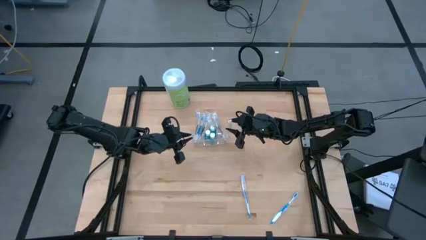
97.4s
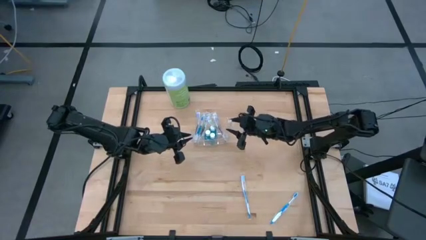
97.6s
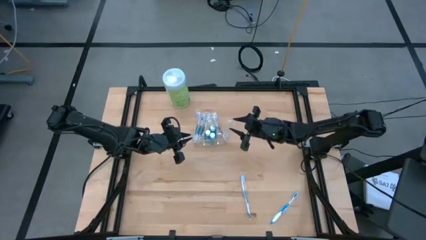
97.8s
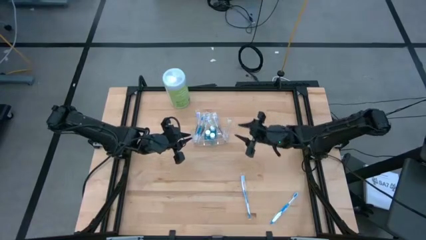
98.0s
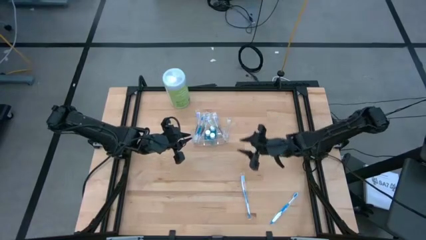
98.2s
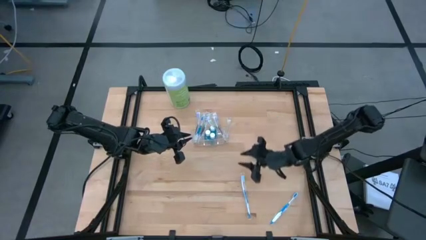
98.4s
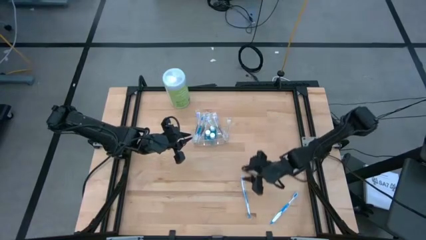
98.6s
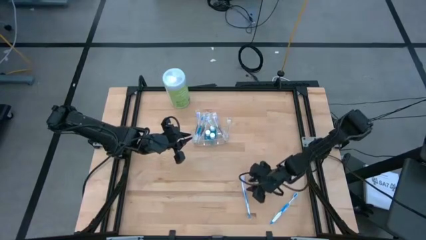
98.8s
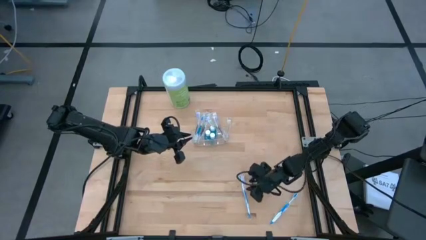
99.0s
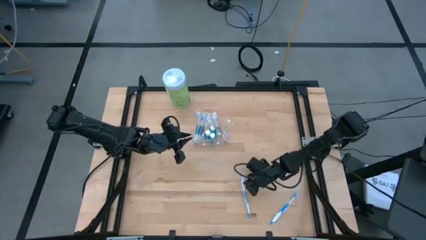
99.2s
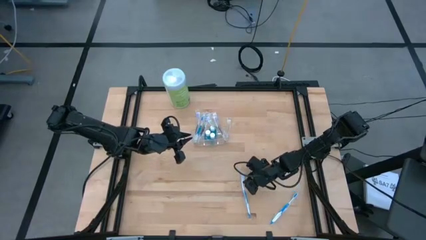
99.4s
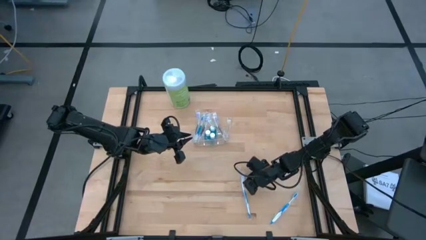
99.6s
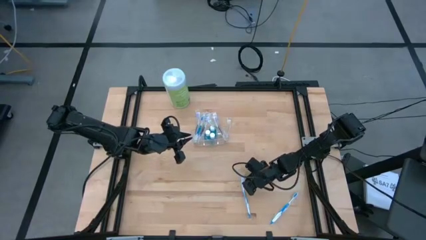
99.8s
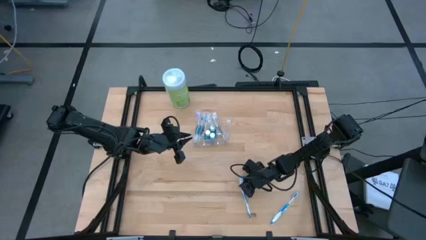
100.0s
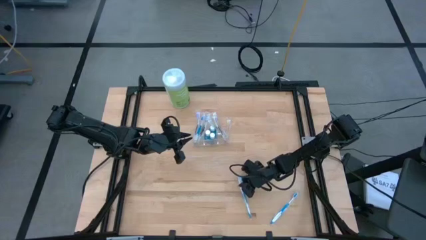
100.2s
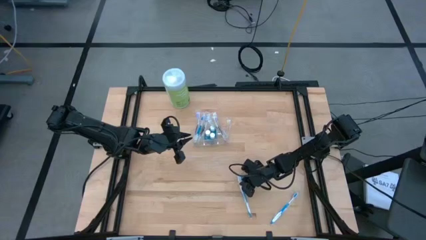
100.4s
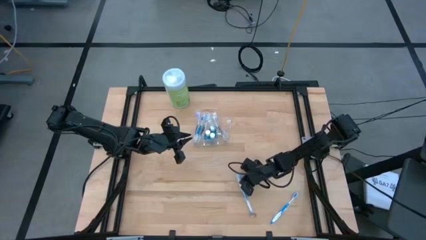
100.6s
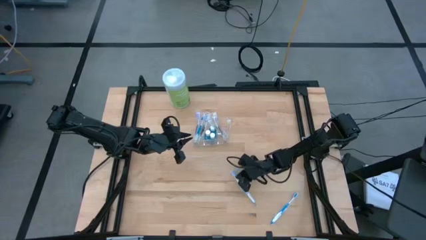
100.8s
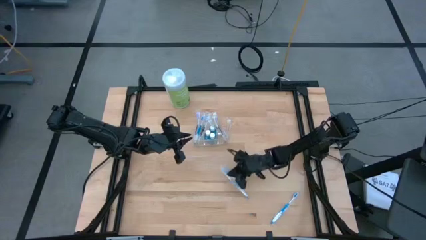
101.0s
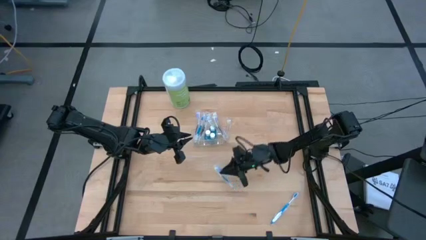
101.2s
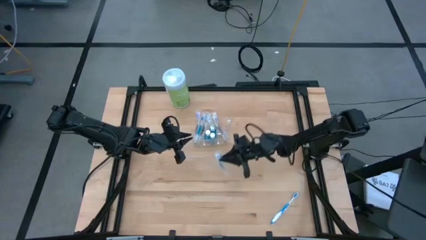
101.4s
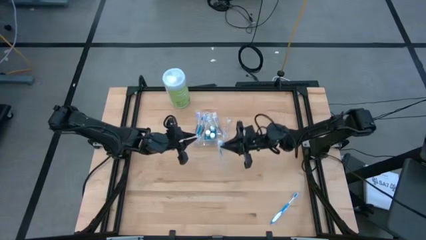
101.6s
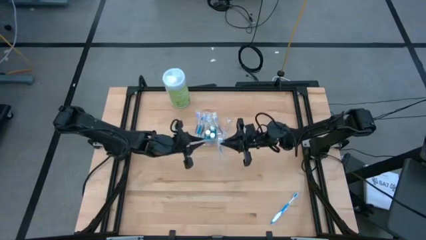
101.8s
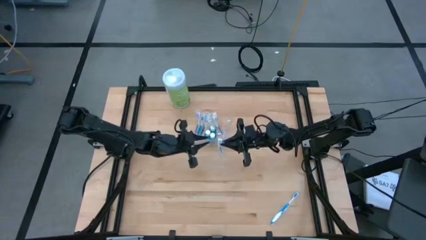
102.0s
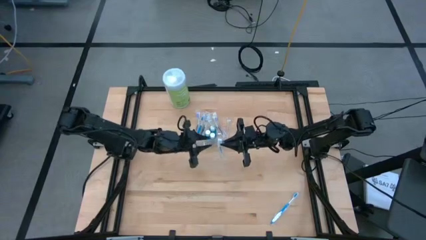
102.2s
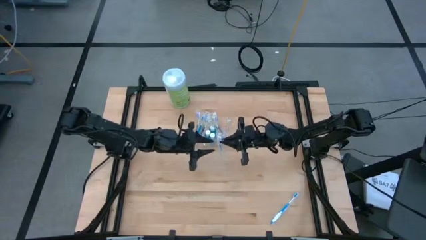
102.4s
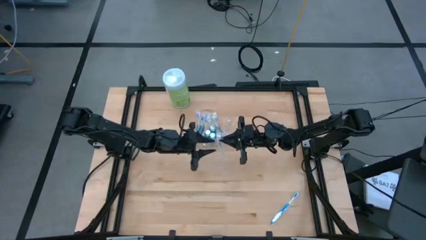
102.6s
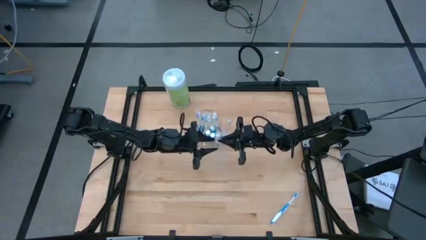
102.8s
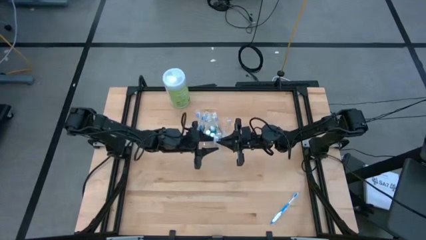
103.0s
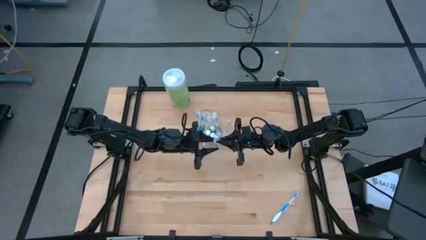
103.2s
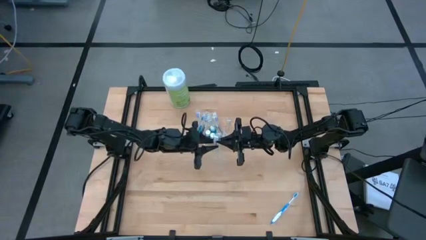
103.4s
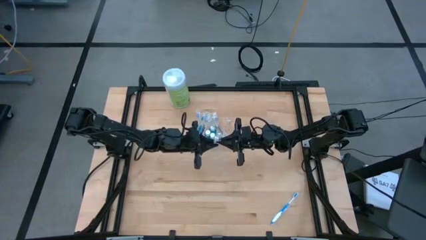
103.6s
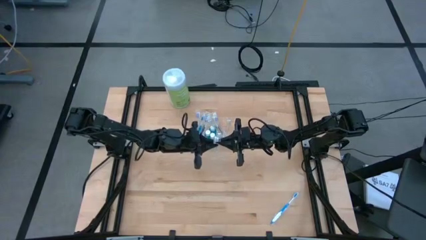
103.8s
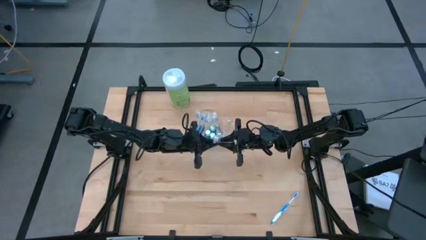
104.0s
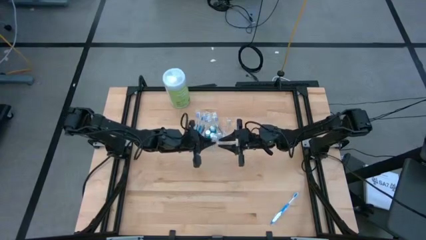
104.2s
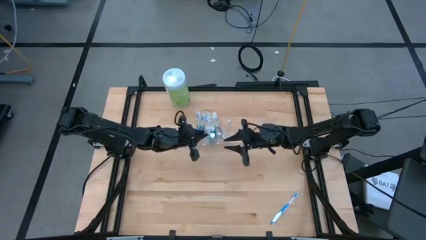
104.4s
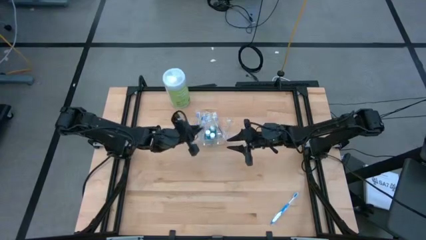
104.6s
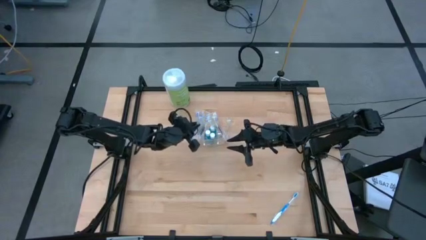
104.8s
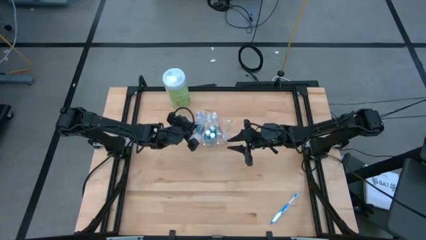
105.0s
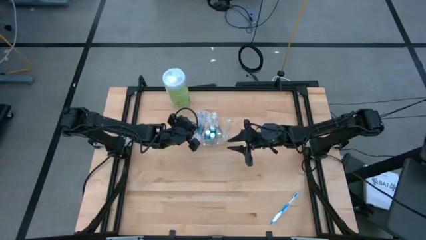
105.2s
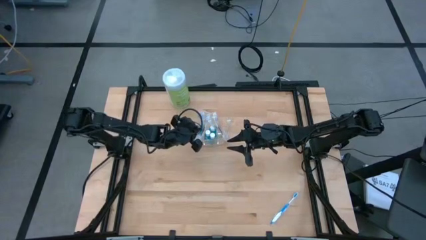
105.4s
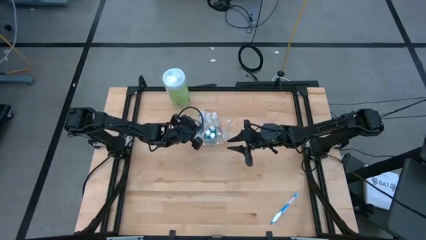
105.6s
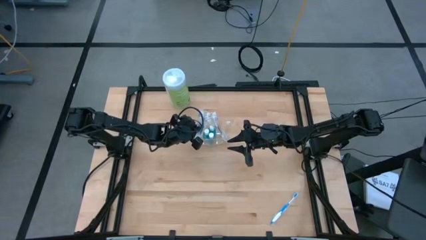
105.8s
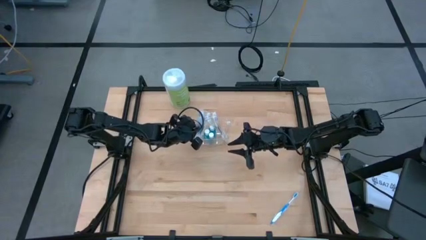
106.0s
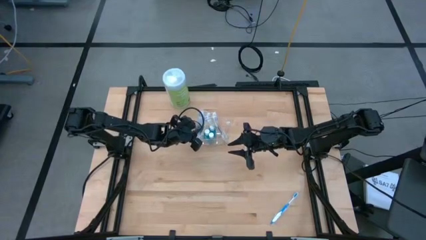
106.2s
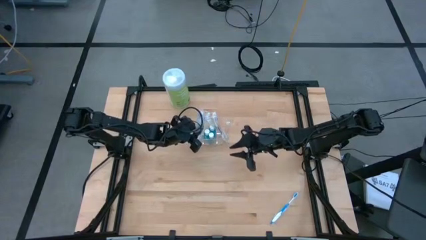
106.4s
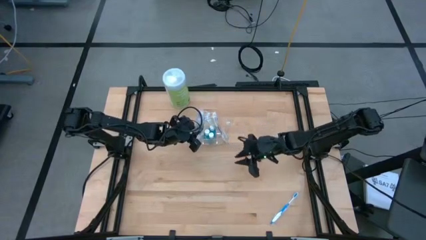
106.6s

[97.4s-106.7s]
Task: Pick & Place toothbrushing station
Put the left blue toothbrush into the transparent organizer

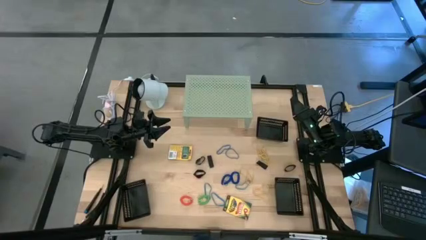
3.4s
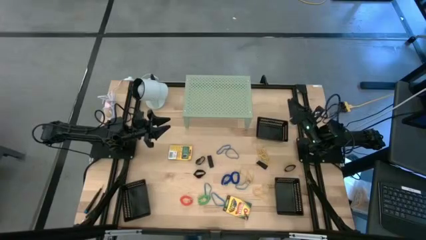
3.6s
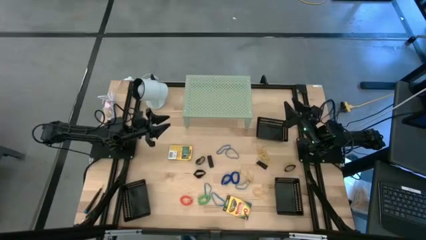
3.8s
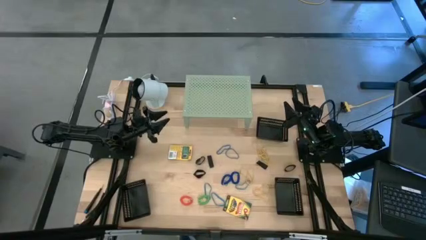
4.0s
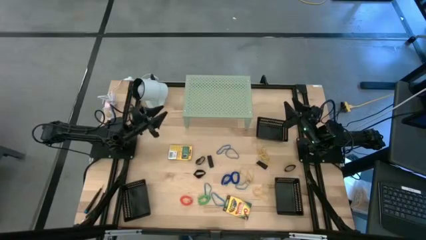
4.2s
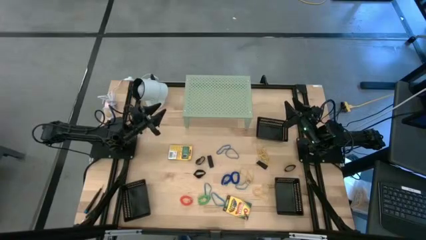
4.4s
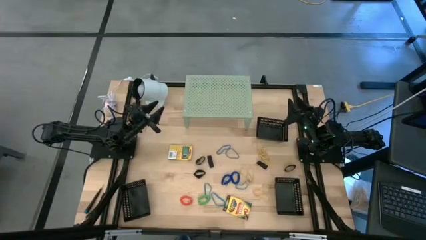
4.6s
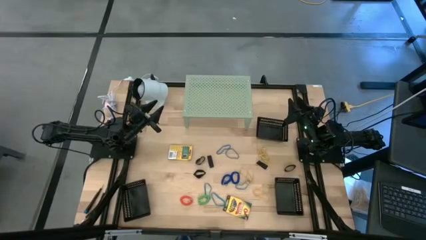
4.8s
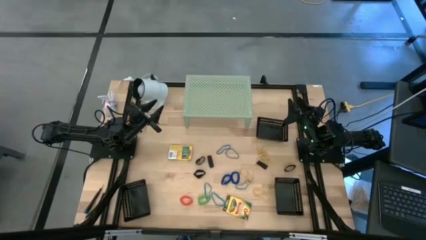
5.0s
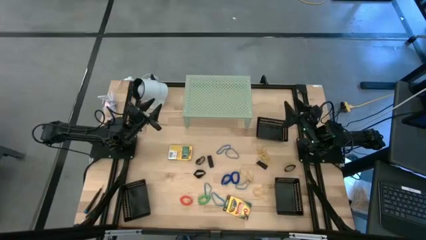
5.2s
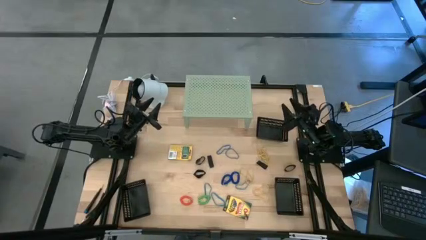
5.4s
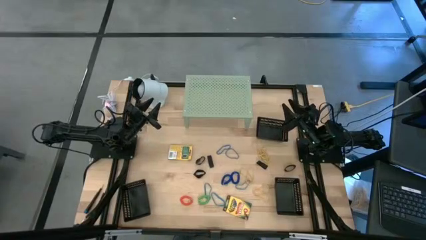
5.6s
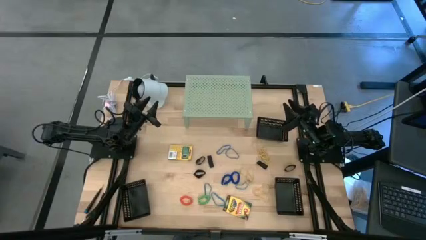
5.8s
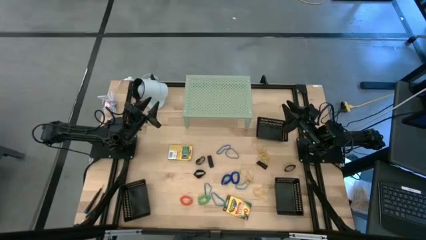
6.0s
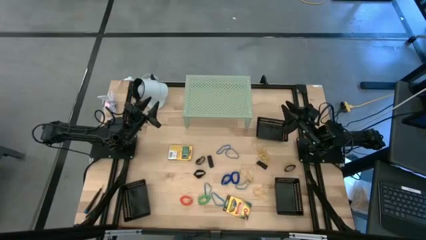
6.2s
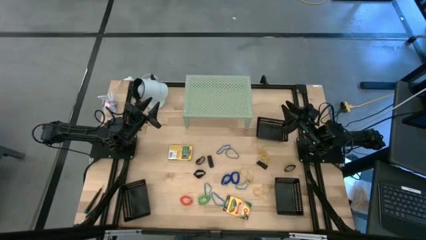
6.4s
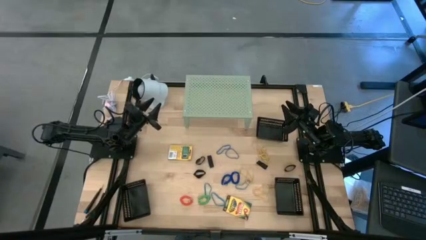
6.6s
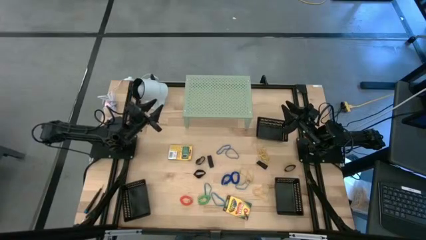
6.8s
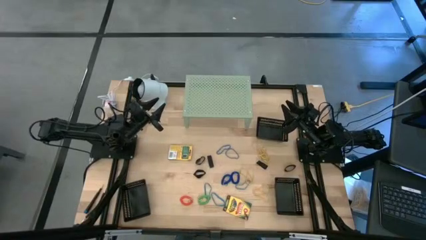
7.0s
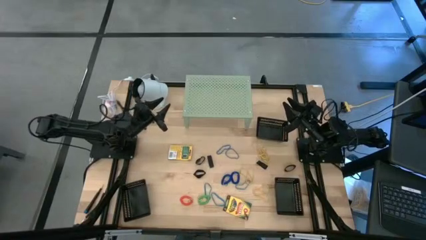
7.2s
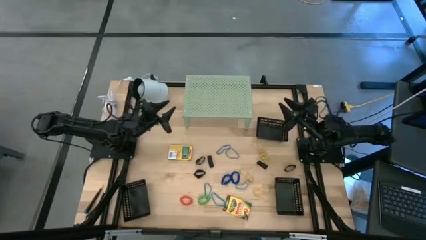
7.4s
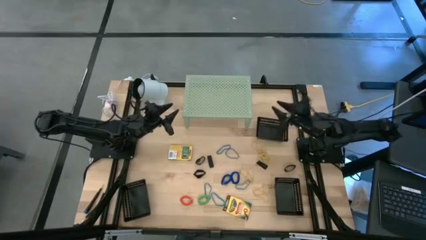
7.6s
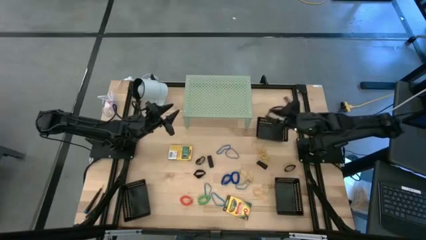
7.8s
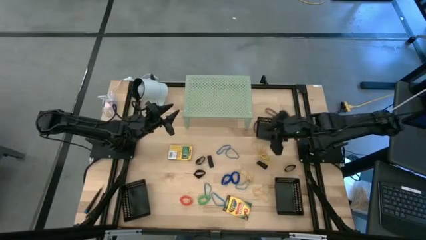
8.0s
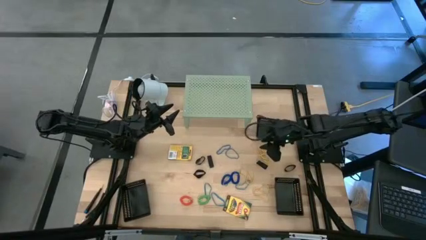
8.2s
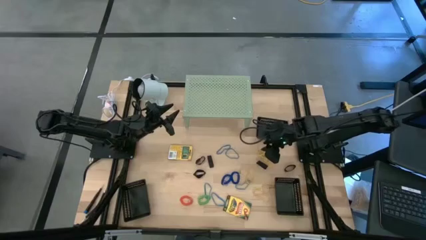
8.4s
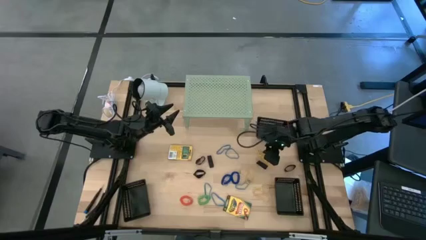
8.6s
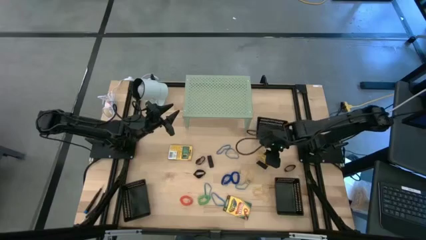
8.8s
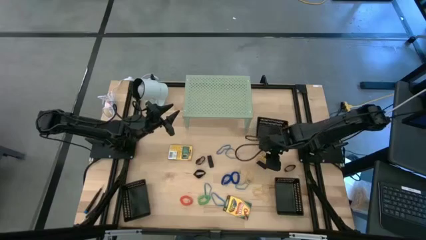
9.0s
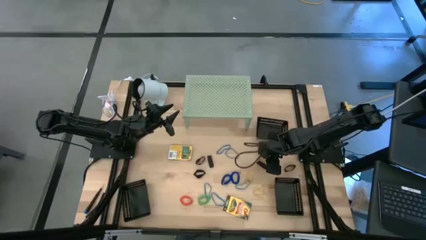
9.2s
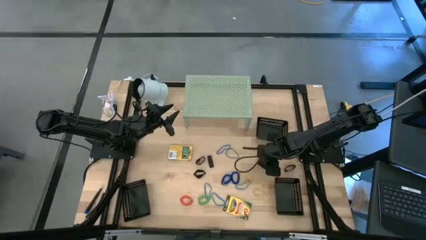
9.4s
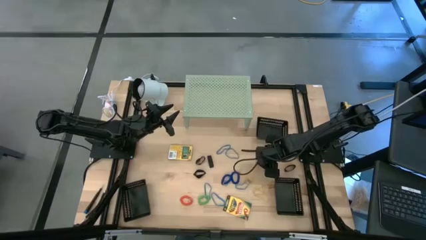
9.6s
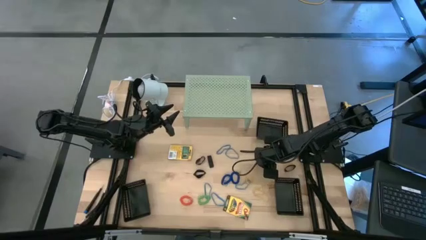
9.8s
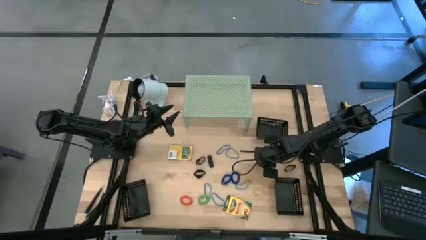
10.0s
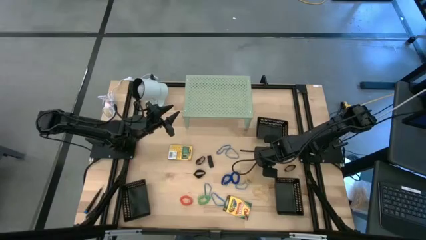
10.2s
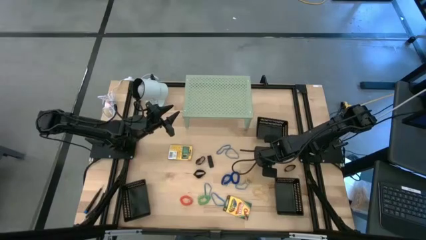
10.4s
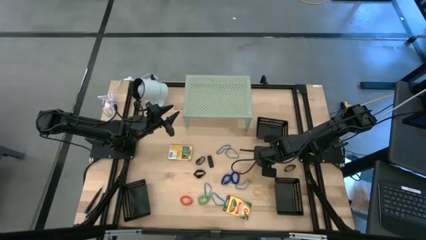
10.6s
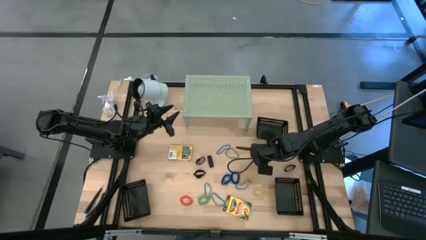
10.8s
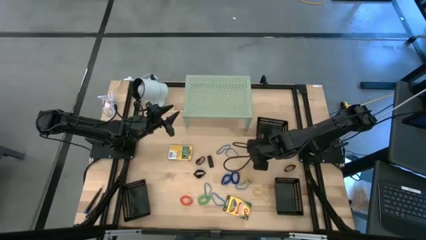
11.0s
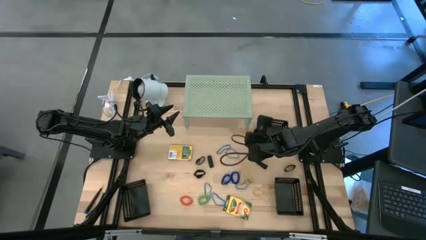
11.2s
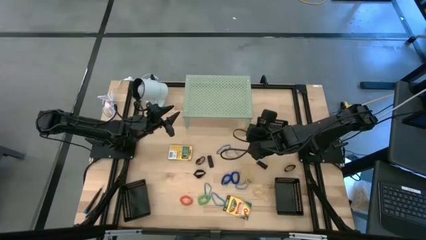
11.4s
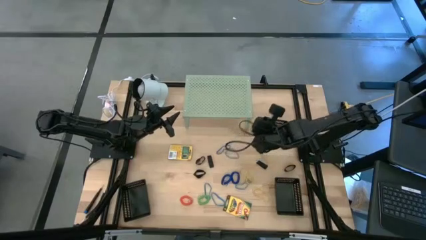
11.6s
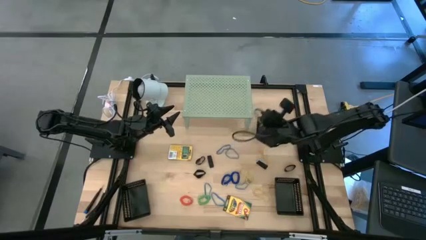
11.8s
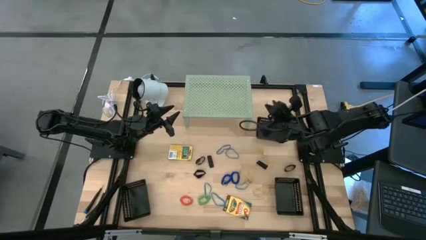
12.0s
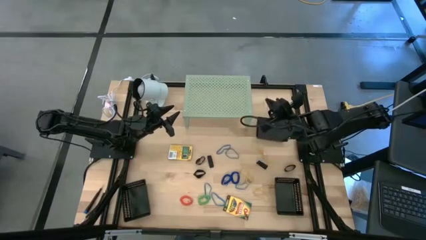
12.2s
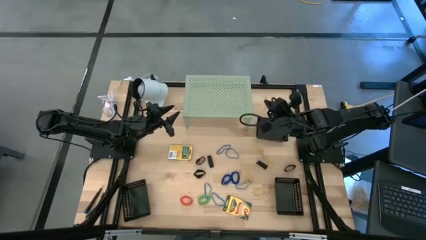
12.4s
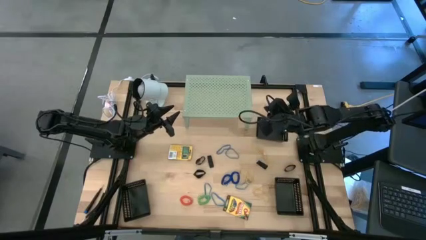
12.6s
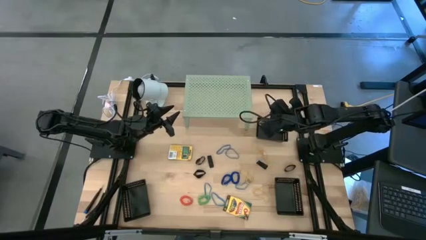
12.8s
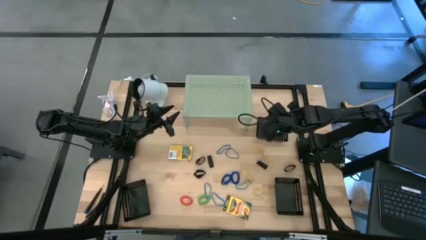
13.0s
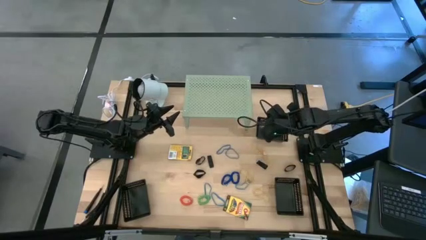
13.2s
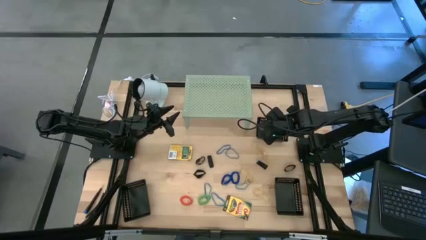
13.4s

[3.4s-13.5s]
Task: Pick & Place Office Desk Supplies
Put the yellow rubber band into the top right black bin
